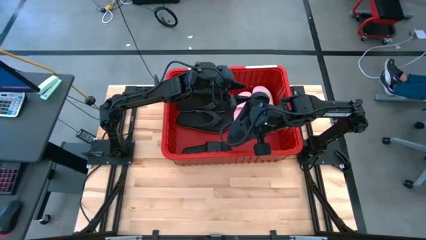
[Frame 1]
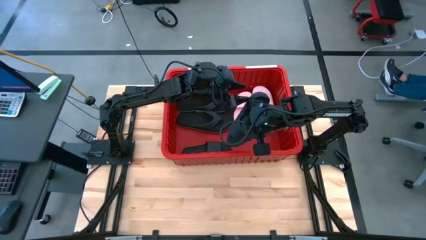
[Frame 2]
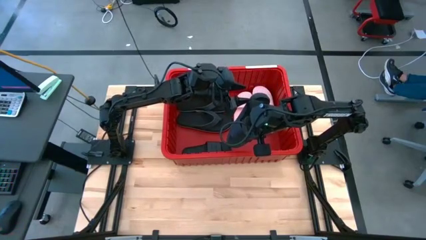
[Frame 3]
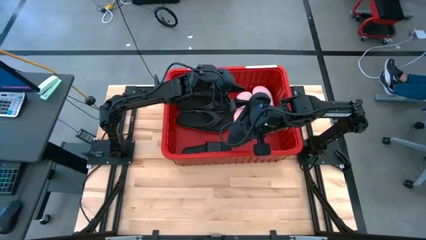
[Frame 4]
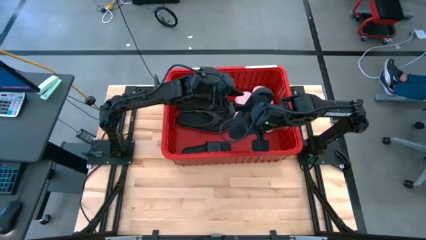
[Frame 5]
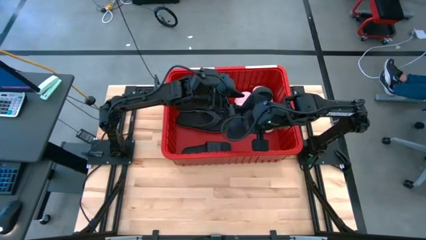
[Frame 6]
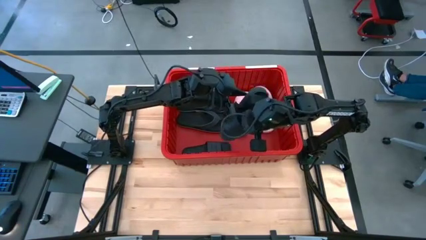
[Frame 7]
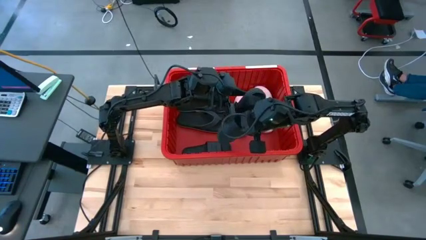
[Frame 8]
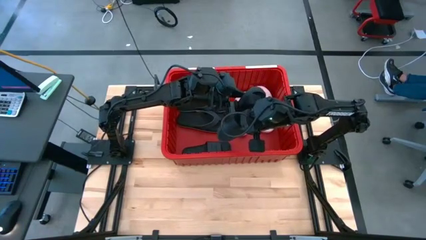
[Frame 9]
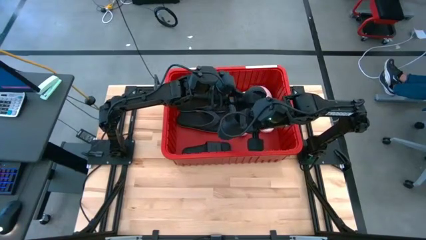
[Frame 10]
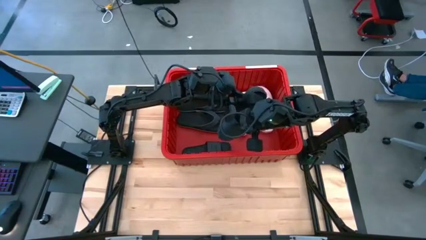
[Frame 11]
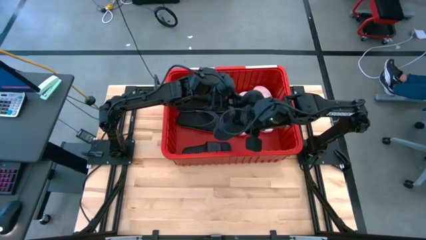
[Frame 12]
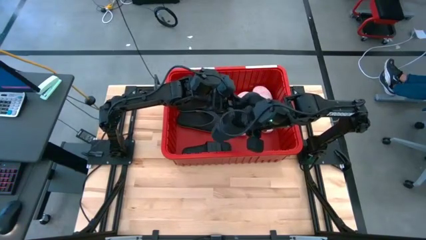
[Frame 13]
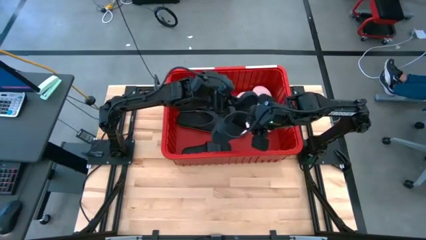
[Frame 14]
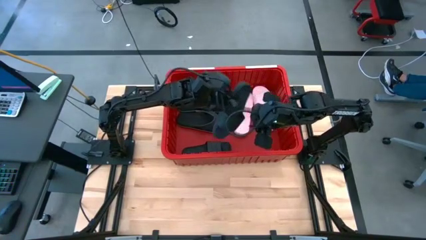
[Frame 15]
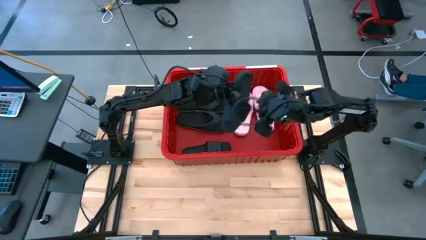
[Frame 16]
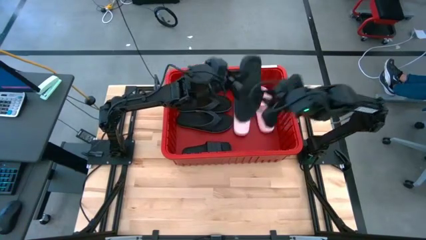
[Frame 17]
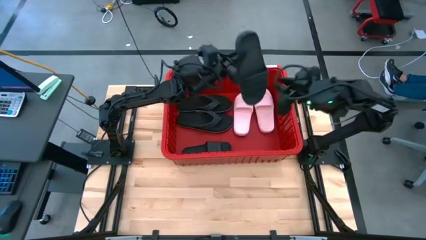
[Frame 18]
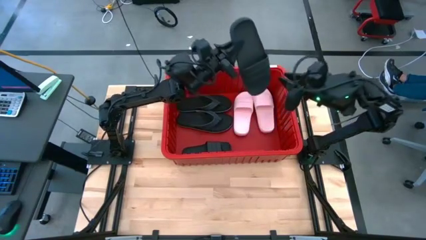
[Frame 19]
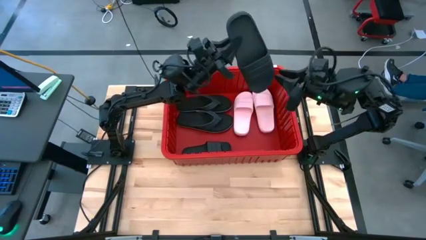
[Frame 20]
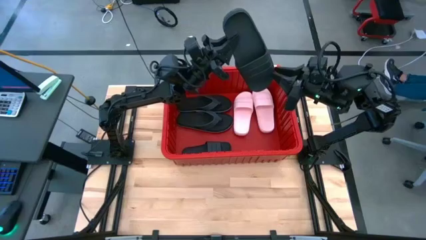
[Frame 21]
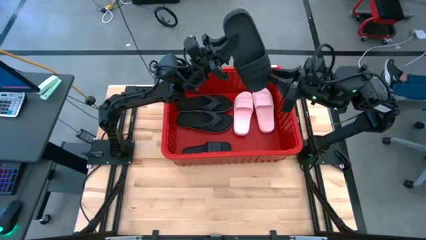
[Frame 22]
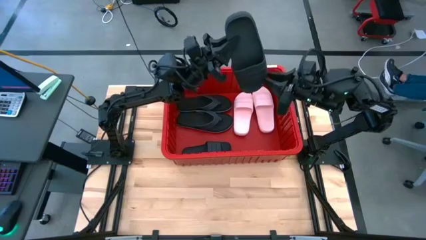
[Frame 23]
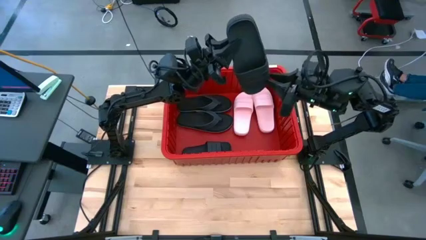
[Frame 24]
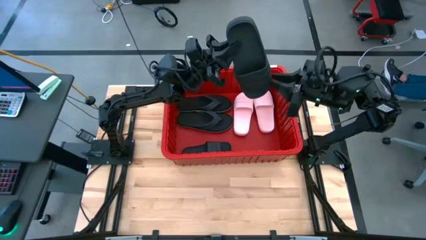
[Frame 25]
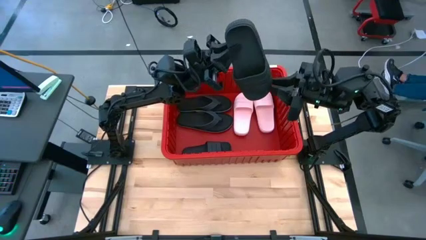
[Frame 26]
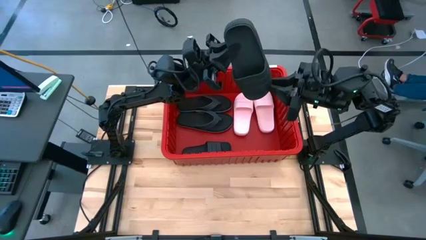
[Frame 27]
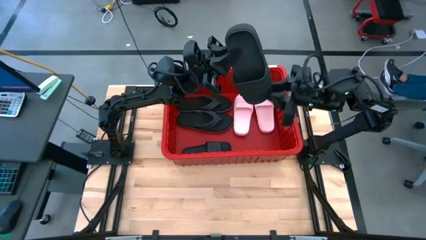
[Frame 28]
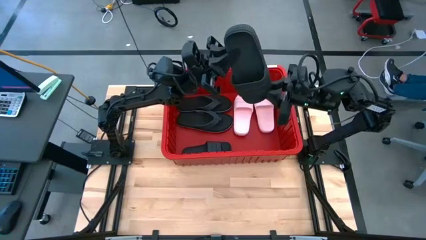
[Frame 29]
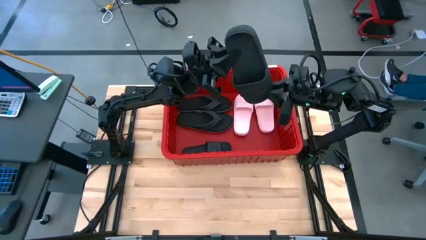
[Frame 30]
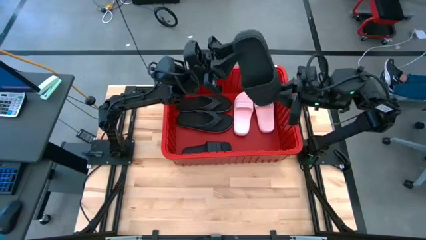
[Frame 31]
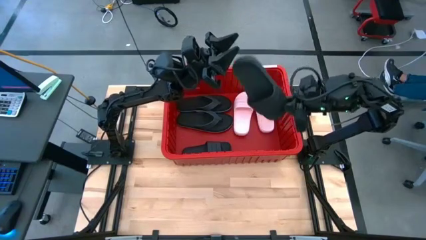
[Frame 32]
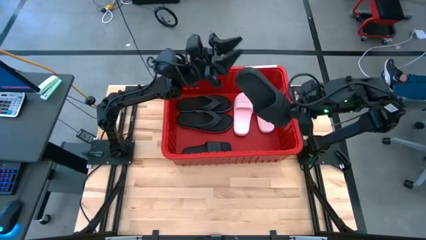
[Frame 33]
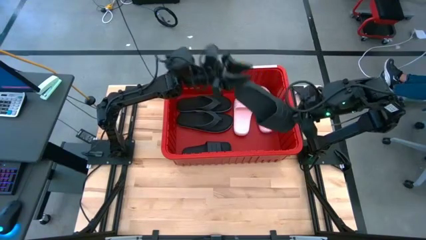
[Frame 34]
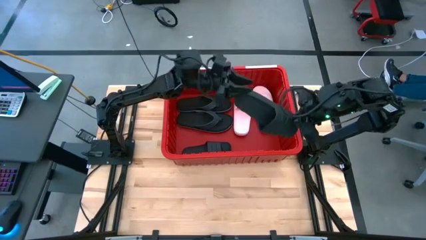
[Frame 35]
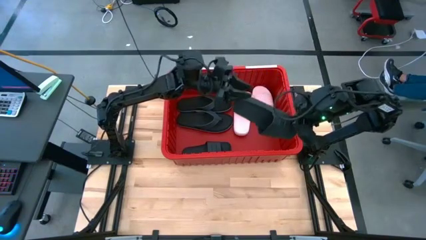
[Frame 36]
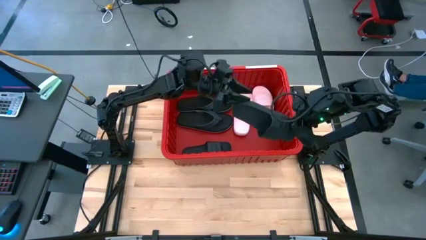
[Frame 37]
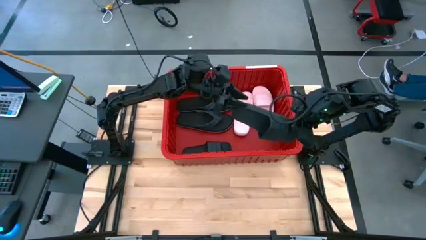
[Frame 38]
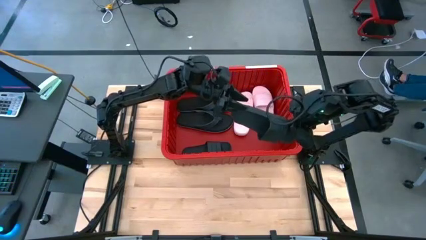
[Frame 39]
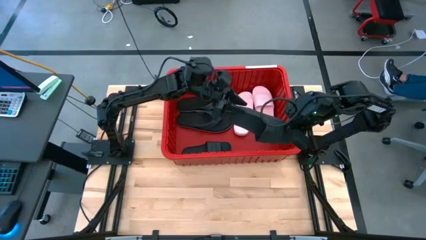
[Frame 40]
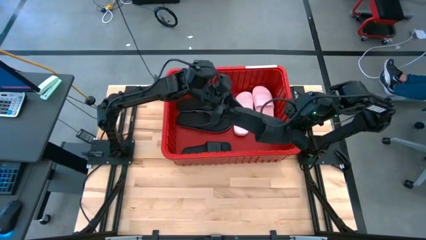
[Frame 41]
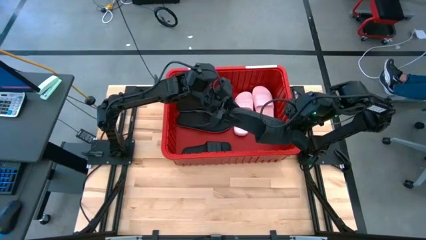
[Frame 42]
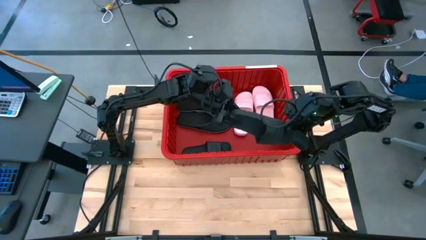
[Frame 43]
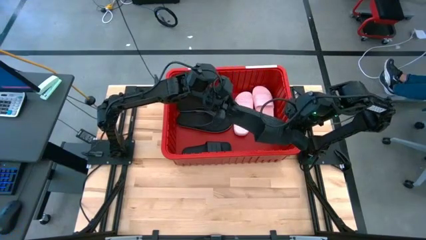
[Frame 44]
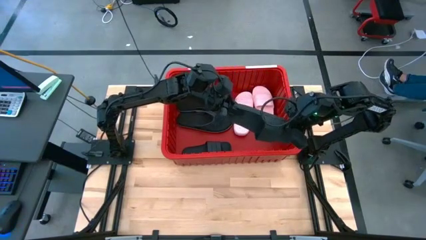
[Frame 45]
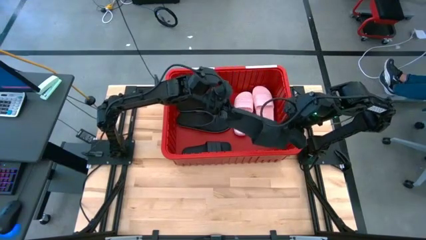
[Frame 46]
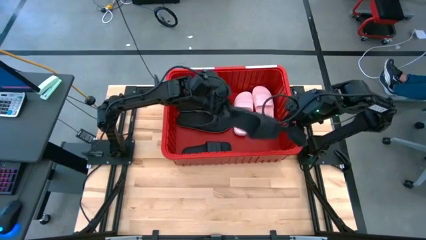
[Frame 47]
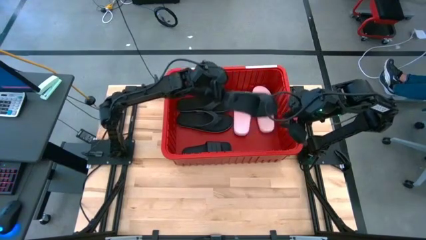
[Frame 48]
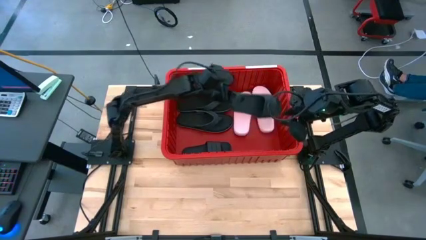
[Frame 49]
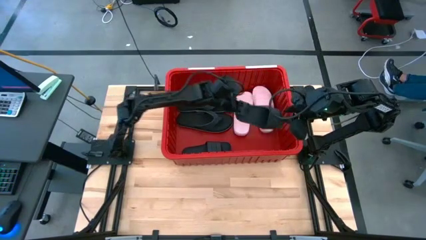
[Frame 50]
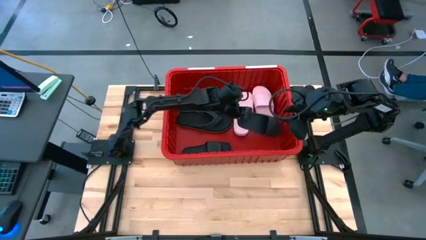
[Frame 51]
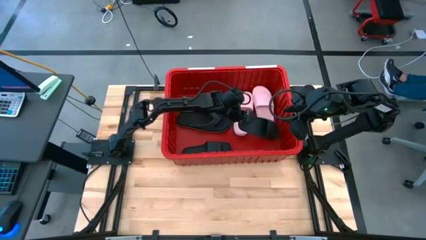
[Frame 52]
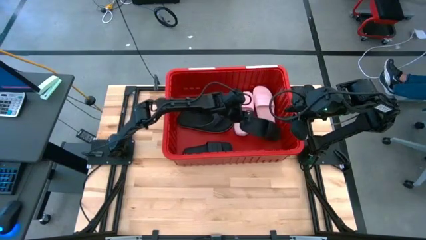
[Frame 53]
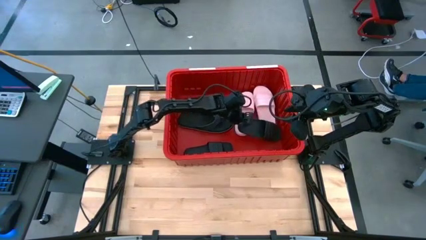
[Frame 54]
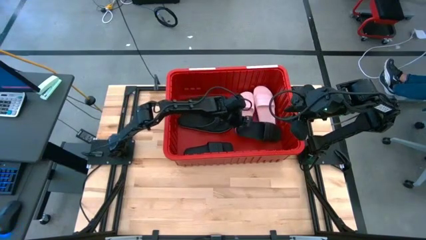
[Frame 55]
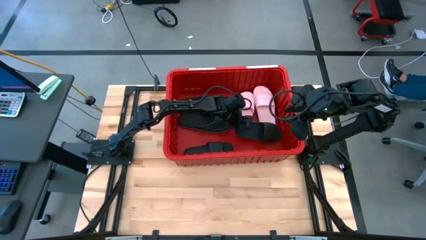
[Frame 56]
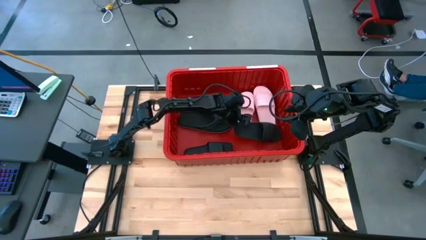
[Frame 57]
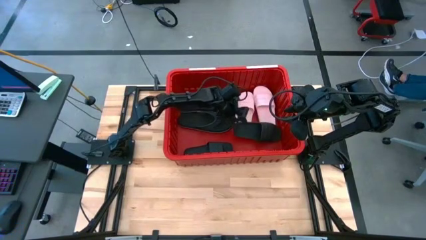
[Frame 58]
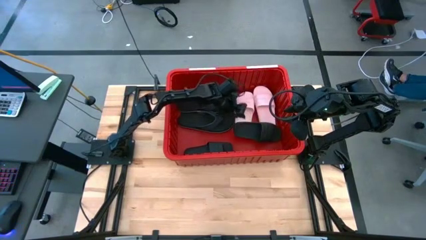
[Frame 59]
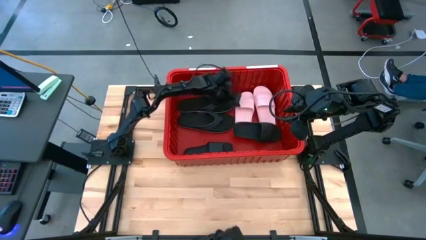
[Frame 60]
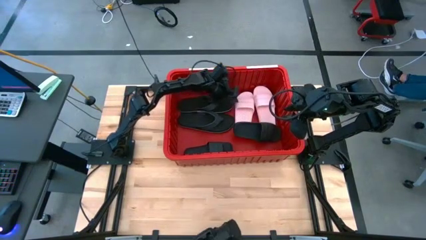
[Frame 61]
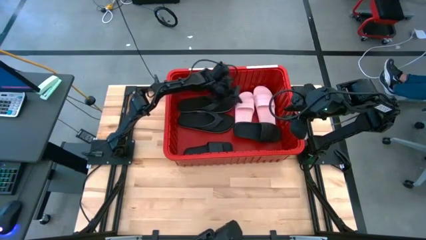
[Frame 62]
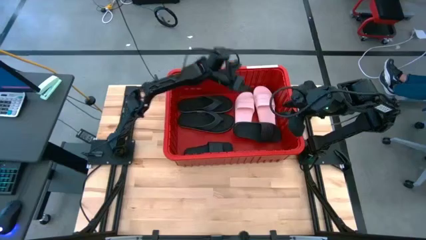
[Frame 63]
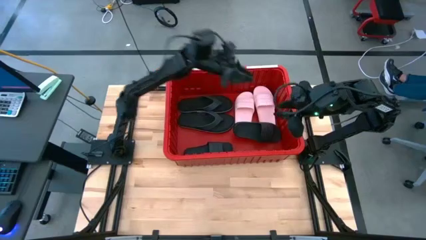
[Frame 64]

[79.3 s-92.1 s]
Task: Pick and place slides into bin
Put the other black pair slides into the bin

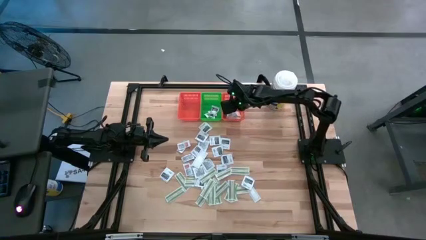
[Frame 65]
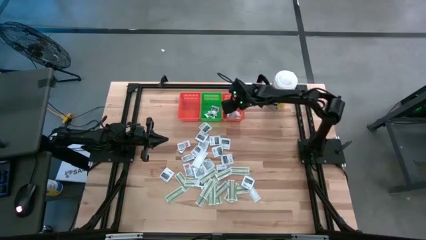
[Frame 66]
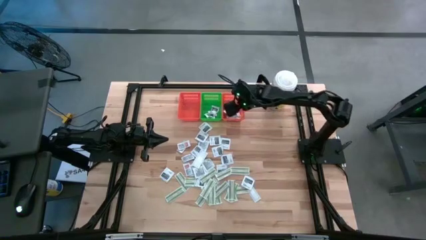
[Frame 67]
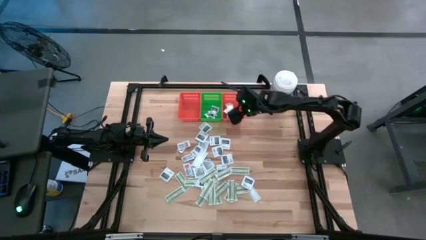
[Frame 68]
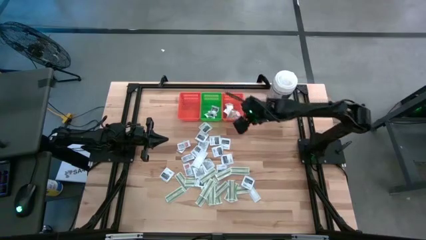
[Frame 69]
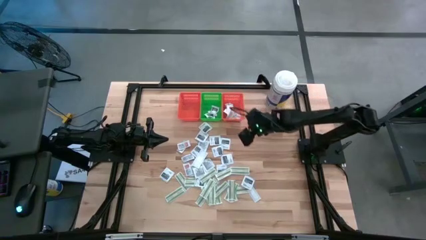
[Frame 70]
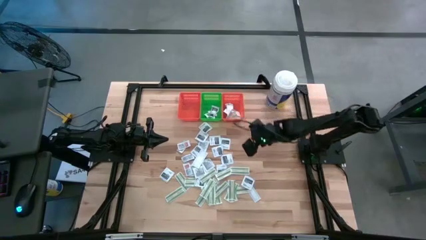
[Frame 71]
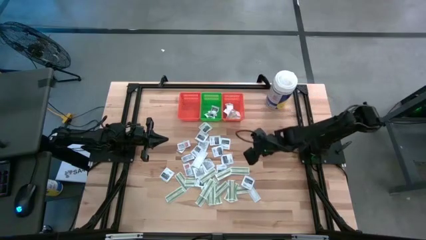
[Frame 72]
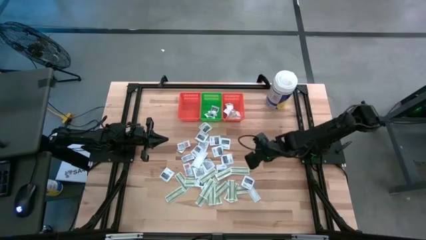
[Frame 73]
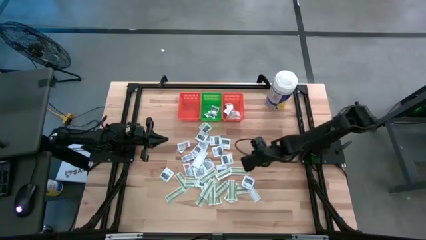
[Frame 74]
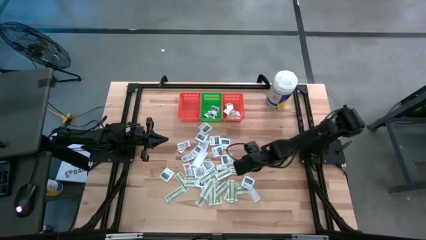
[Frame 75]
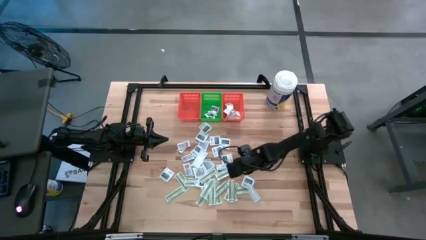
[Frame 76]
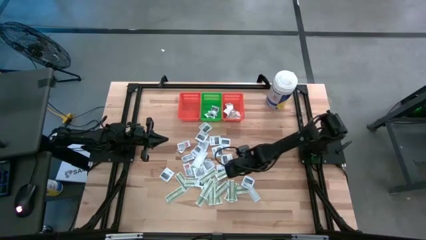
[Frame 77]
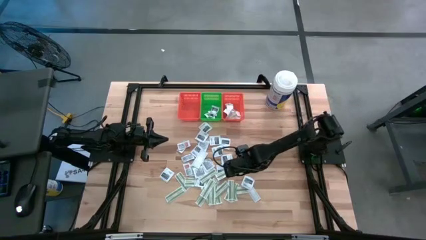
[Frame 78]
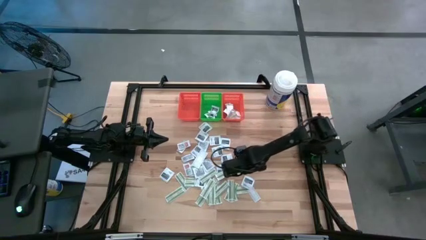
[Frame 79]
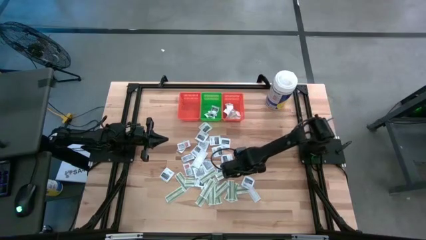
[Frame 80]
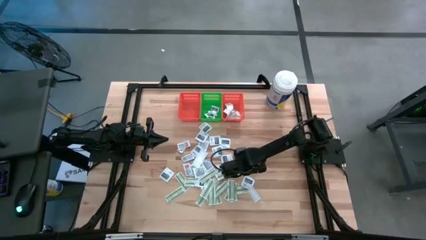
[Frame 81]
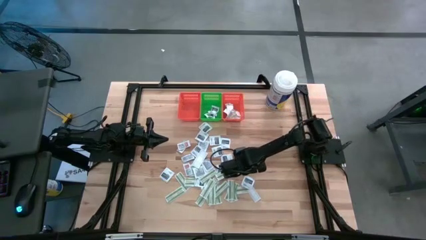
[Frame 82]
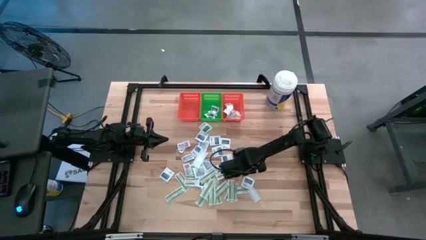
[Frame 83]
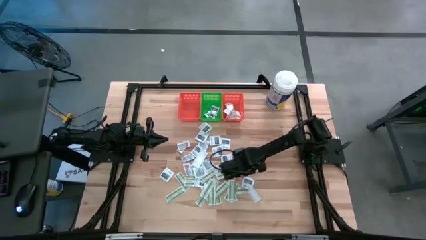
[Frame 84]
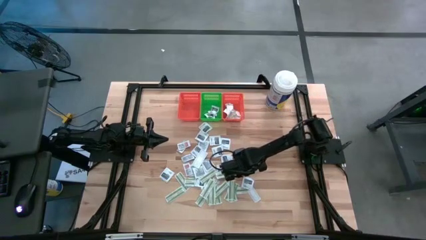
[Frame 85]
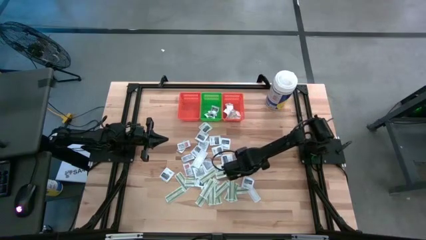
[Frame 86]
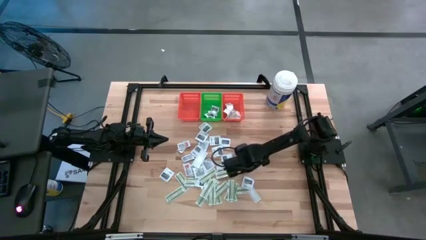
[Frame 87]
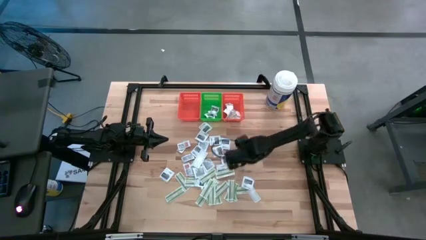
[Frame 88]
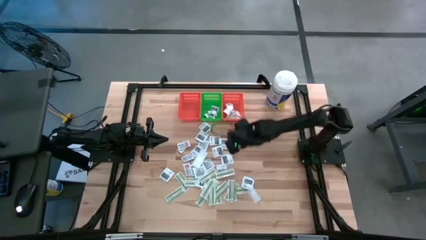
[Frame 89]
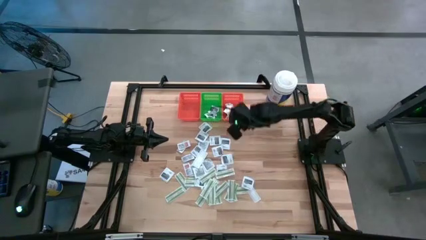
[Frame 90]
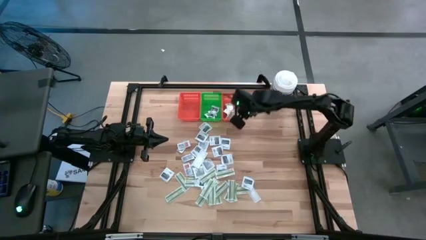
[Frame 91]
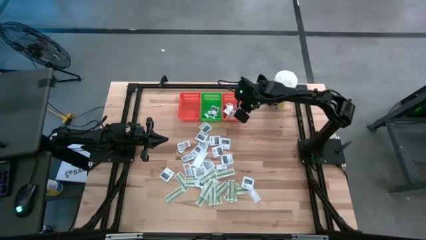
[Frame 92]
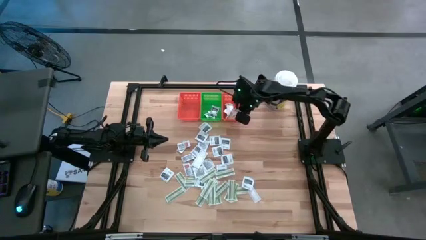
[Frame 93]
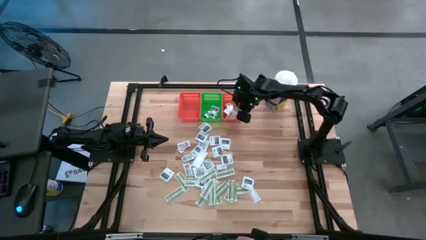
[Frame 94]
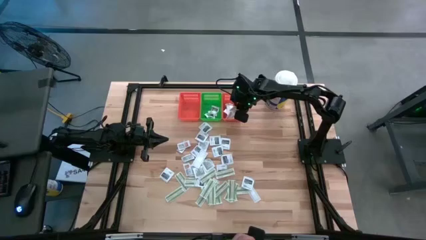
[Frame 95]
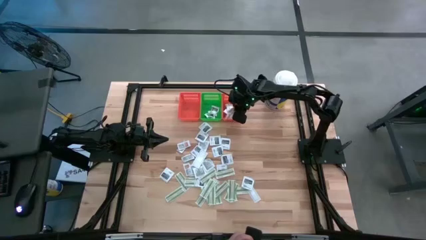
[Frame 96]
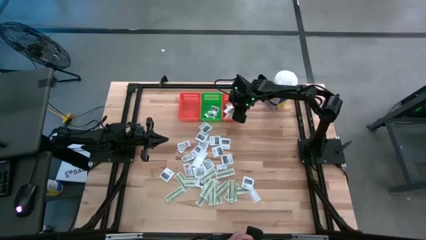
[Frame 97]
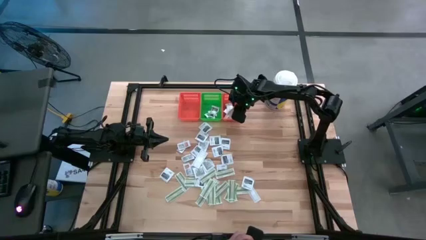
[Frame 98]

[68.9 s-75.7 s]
Task: Pick & Place First Aid Supplies
Put the bandage pack into the right orange bin
